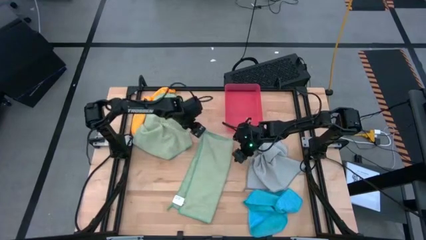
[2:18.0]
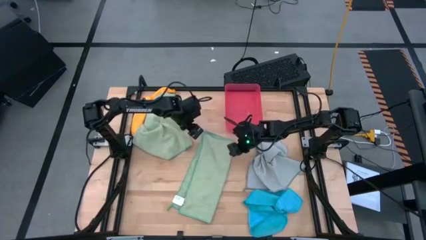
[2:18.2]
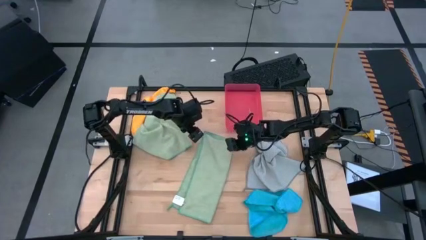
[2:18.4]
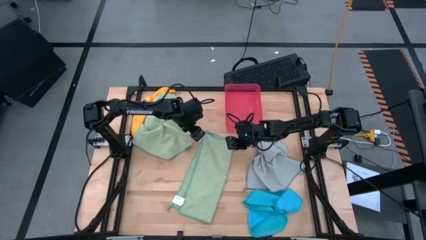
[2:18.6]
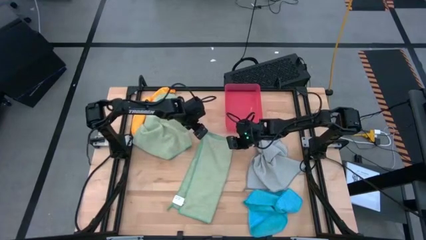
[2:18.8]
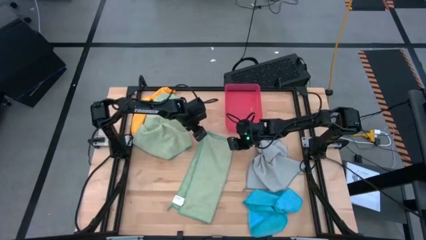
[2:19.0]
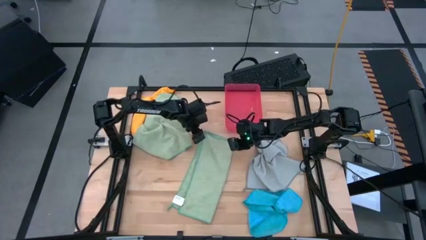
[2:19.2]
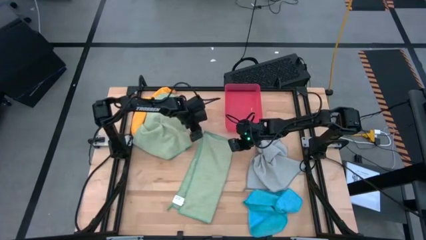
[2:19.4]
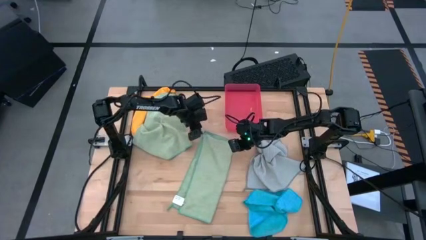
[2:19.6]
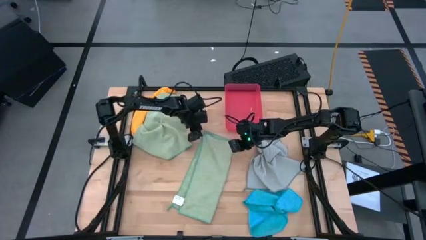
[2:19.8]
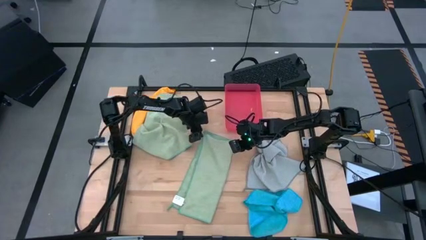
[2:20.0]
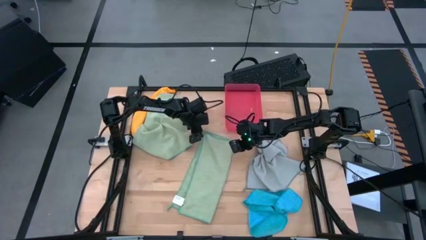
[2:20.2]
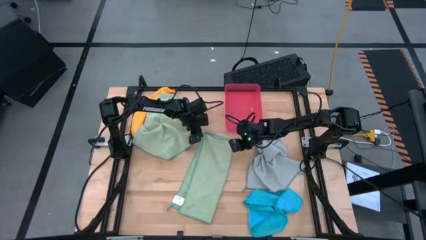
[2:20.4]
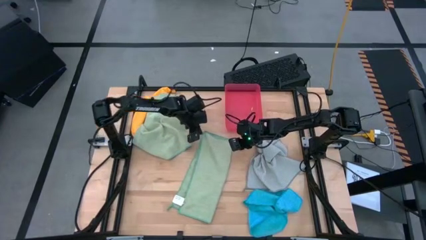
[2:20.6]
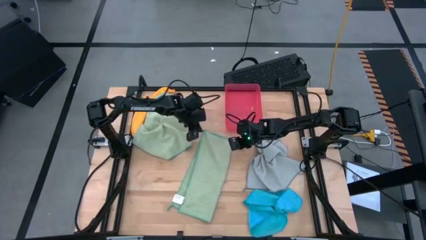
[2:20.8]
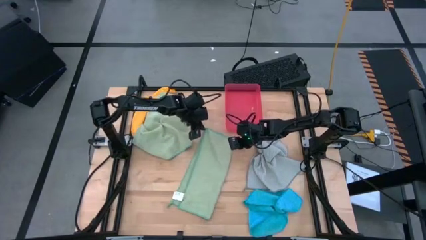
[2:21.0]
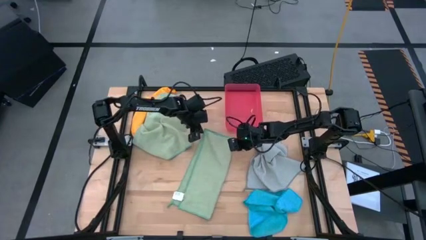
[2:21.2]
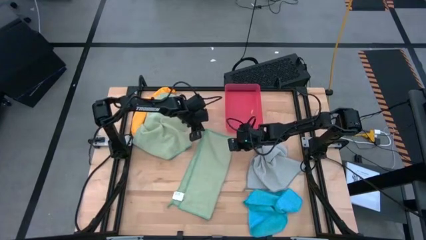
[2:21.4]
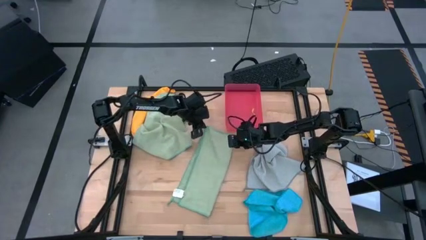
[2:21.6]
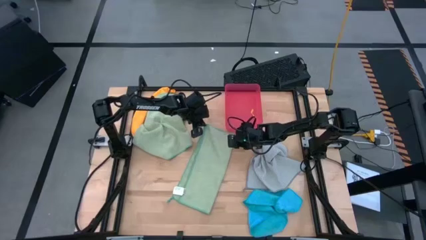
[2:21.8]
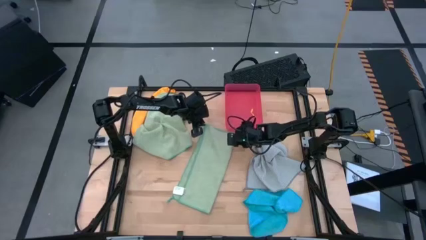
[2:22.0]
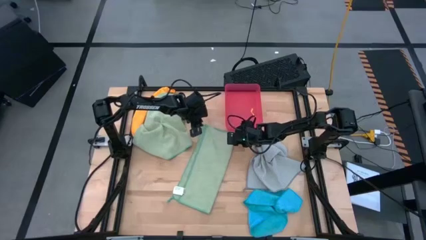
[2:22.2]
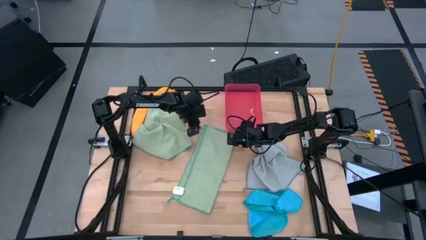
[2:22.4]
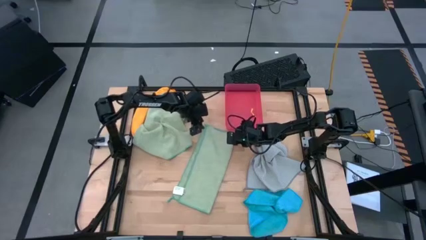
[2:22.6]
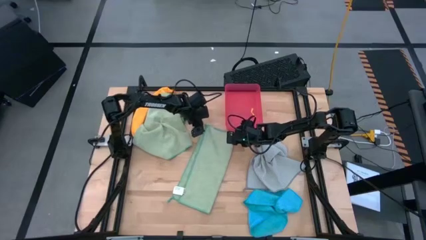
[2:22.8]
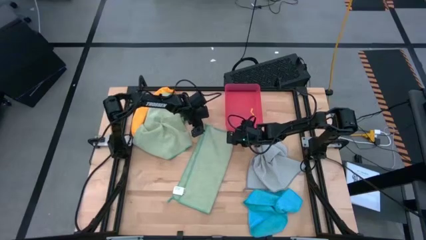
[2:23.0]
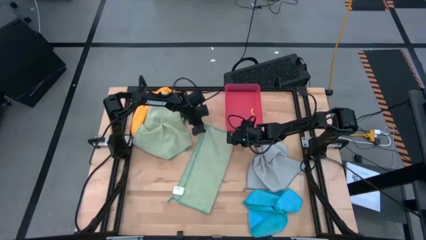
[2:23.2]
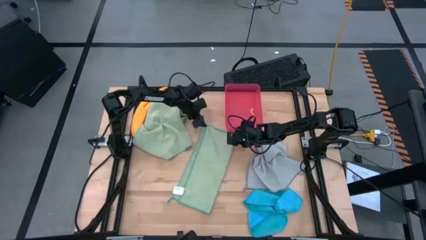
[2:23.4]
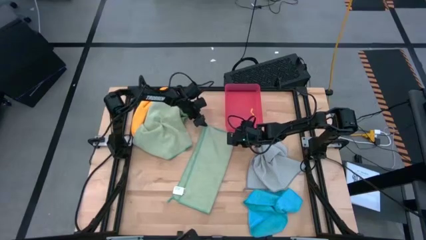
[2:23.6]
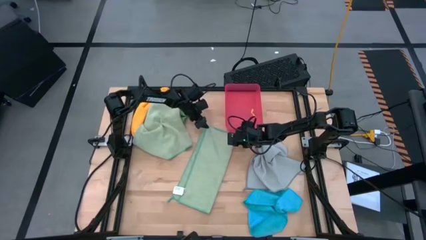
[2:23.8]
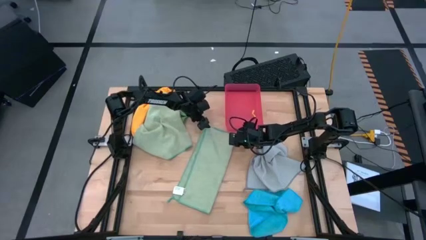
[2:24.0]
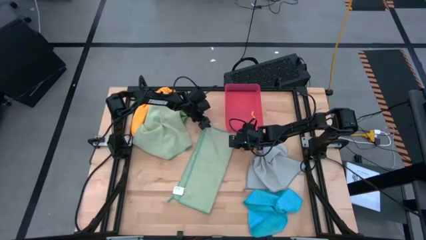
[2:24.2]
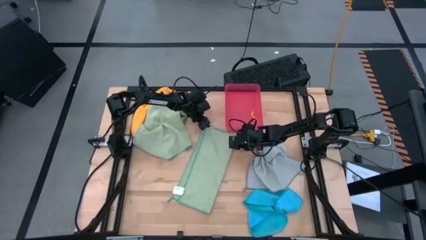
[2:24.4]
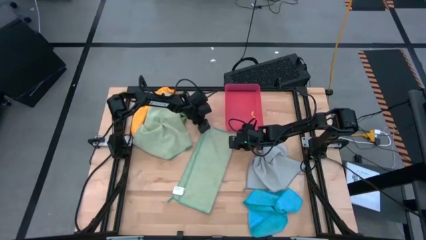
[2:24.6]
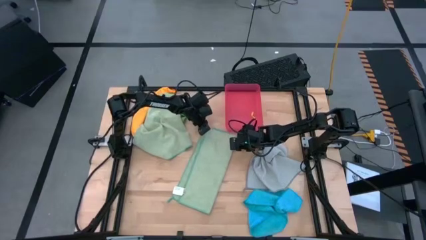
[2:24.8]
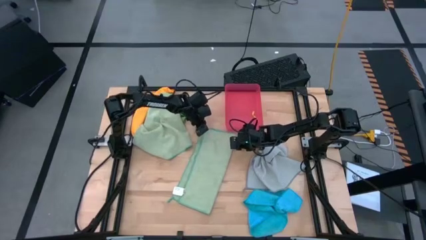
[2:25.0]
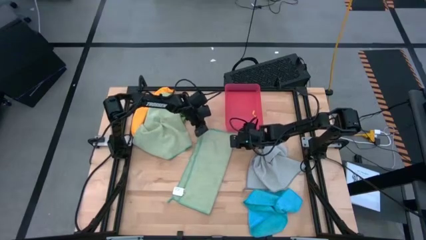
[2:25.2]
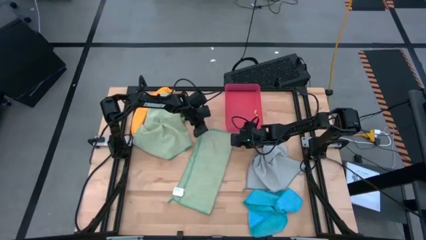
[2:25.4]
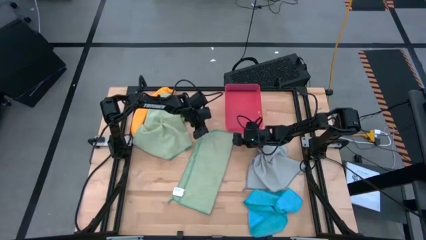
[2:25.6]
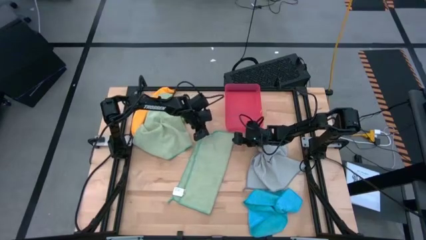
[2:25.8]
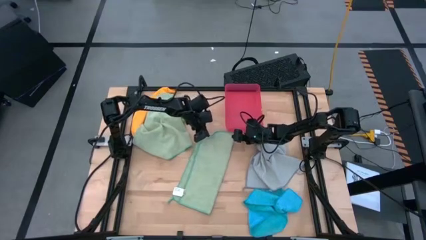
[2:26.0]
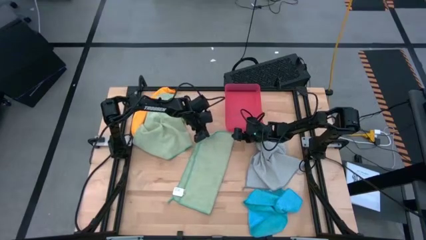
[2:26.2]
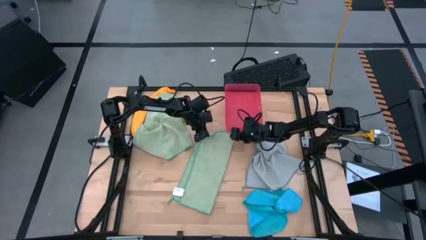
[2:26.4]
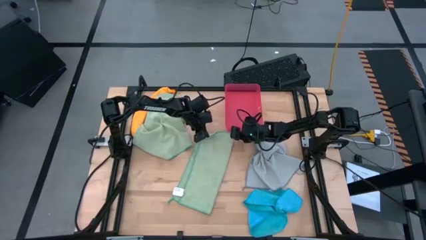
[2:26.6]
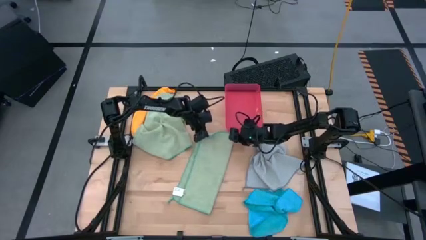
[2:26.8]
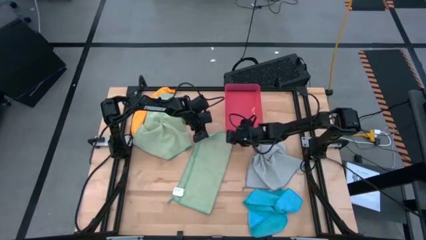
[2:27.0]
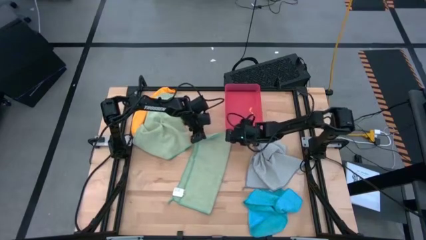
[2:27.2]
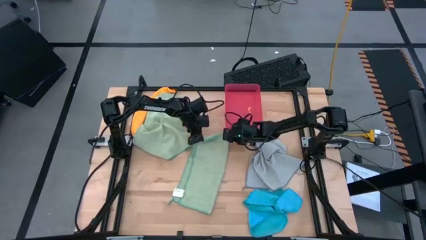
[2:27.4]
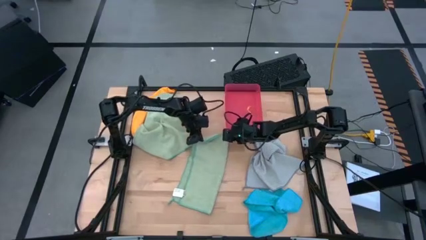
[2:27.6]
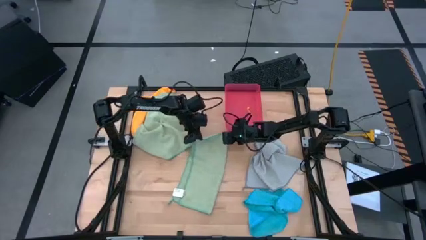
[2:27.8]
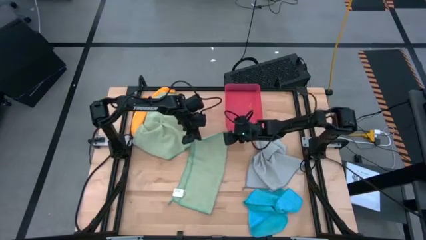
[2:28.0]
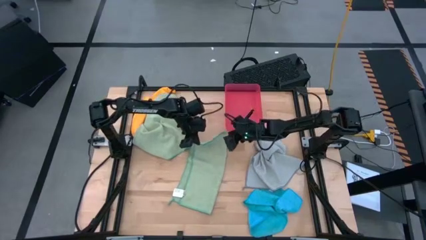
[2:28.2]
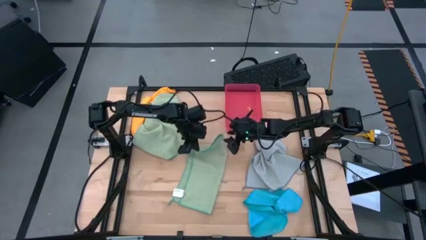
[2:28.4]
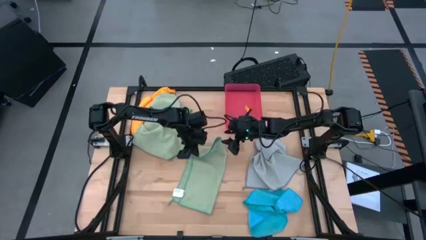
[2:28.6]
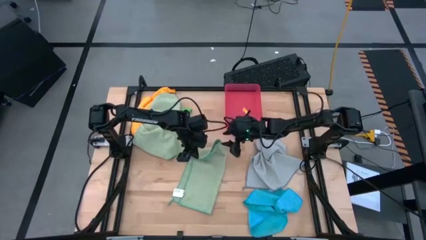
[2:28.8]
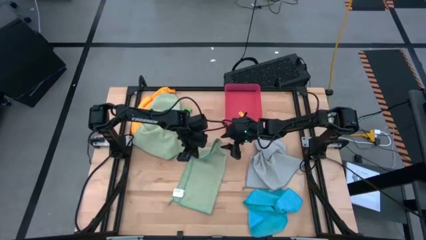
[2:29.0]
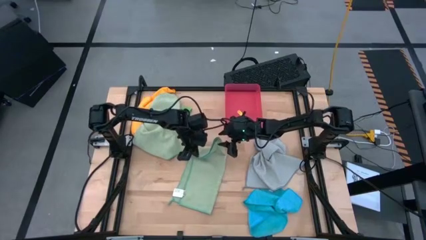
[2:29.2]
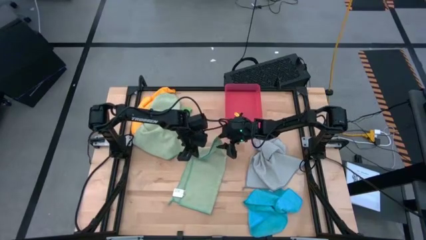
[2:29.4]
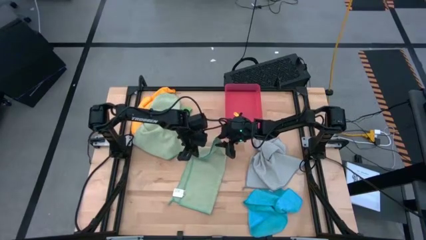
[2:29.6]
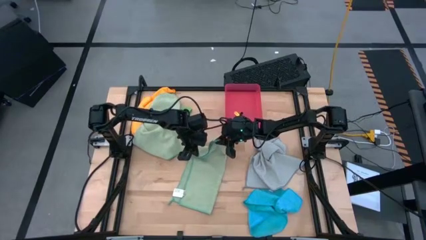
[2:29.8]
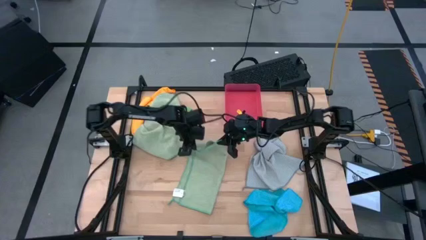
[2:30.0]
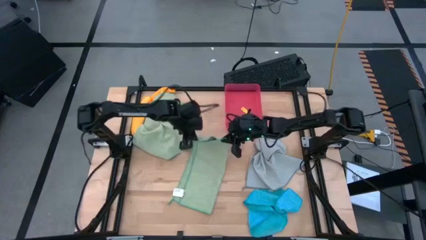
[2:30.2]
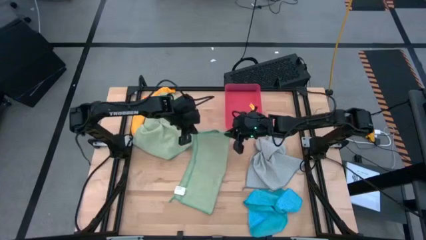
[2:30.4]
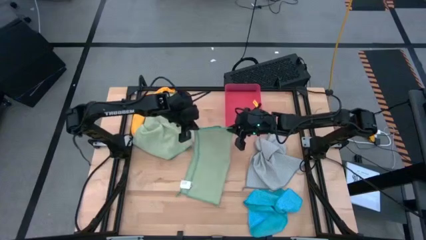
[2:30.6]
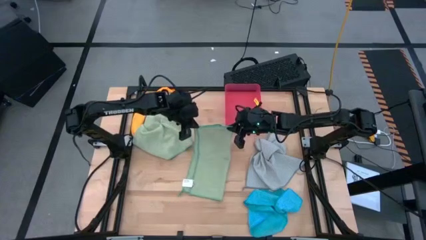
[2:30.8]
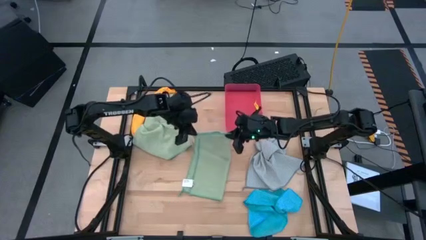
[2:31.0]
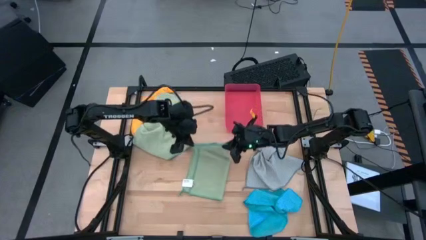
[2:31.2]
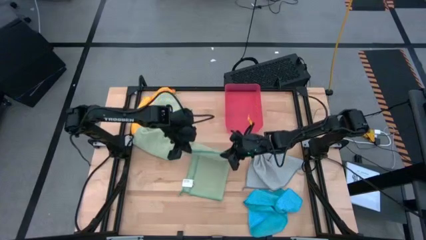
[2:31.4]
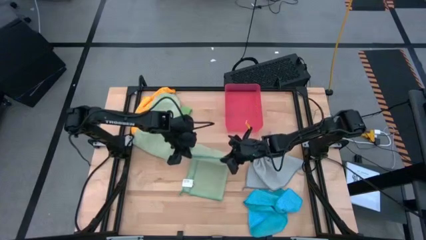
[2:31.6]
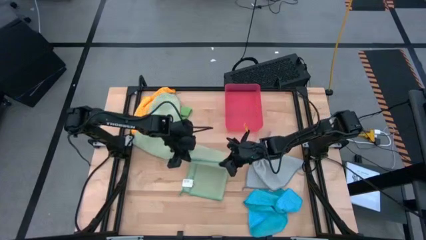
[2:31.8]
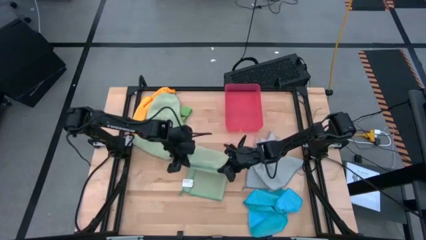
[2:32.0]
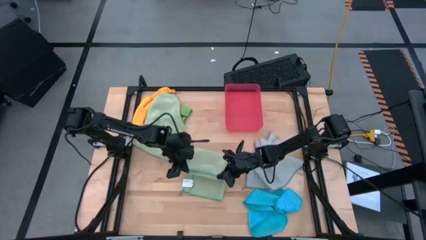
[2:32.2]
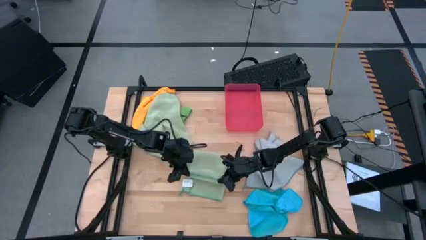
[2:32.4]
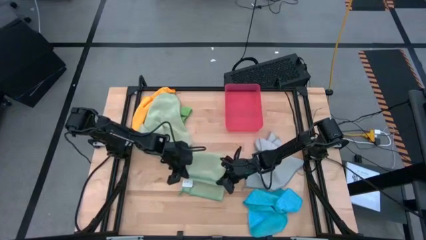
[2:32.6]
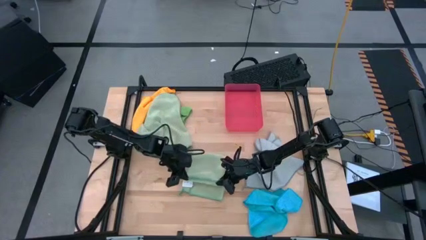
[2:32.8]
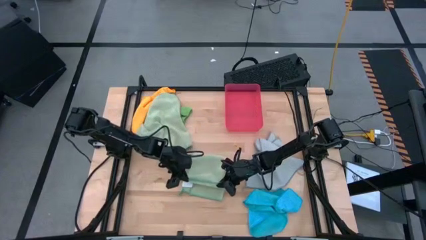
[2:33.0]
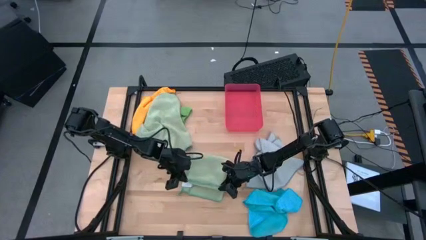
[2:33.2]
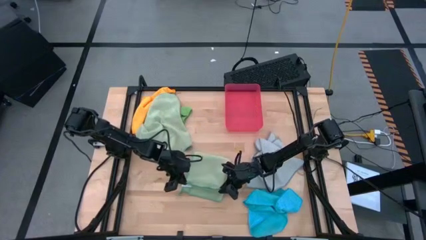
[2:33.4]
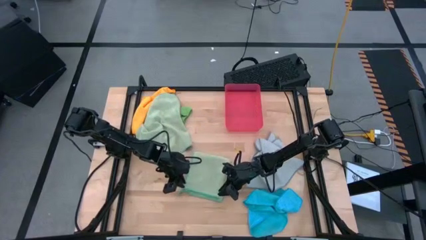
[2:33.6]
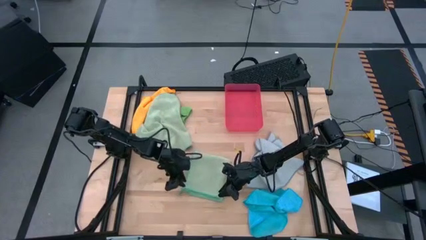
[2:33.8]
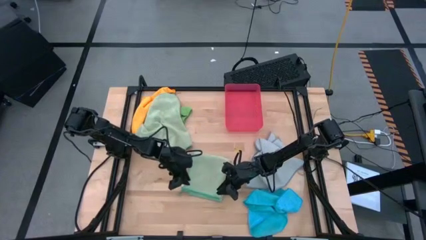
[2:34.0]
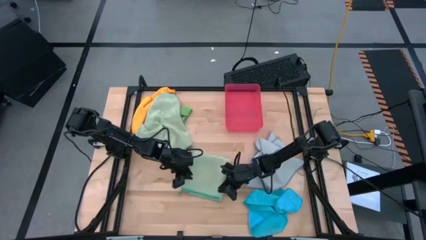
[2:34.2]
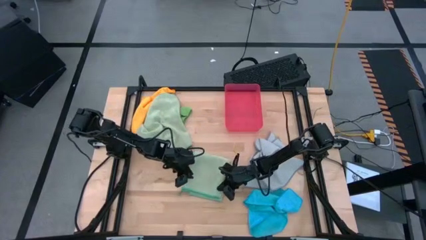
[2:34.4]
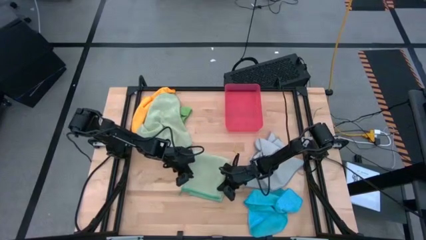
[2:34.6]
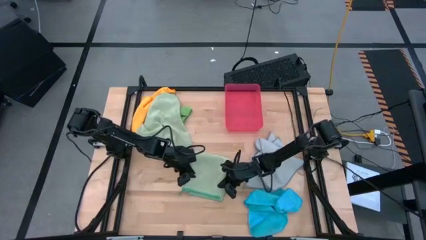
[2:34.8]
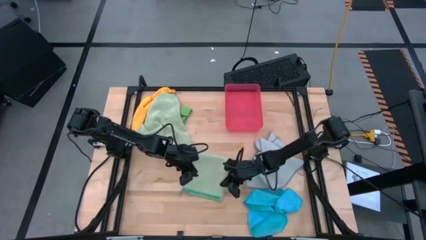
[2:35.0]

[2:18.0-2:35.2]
Task: Fold microfiber towels
Fold the right light green microfiber cloth
